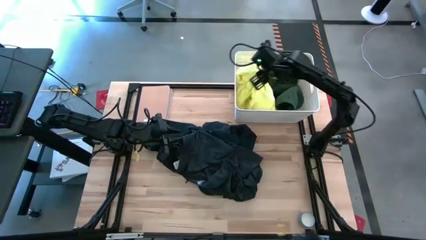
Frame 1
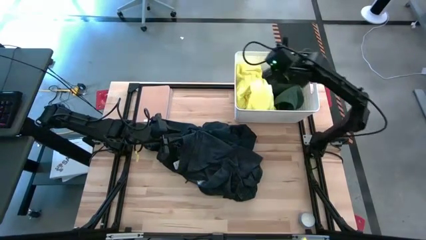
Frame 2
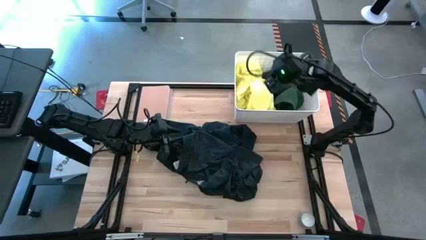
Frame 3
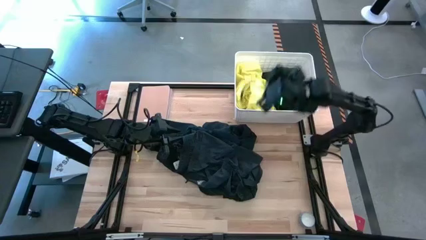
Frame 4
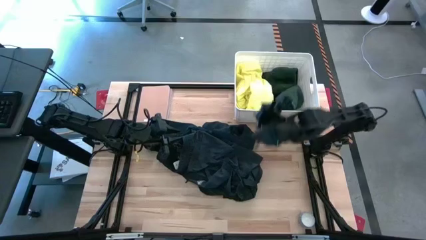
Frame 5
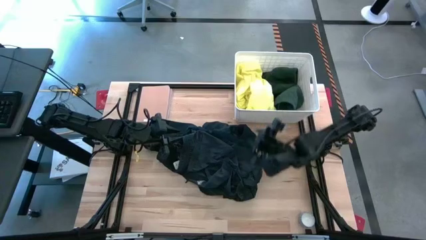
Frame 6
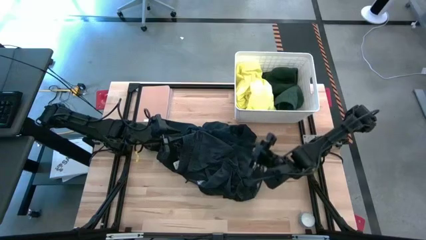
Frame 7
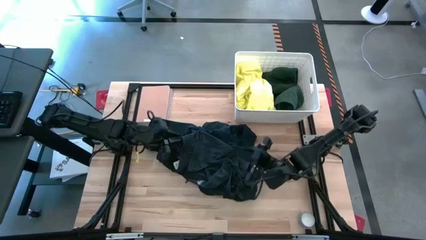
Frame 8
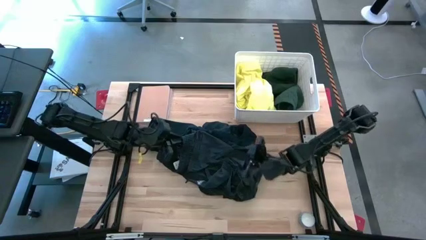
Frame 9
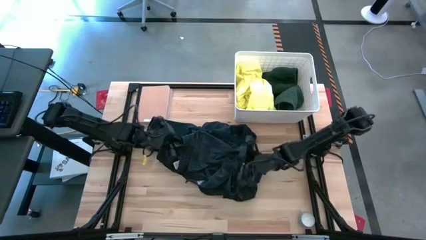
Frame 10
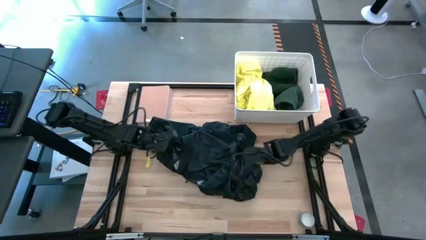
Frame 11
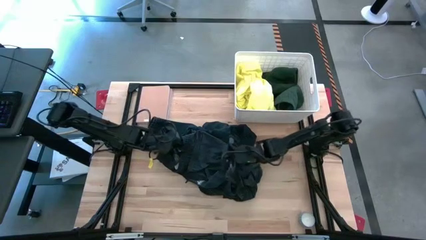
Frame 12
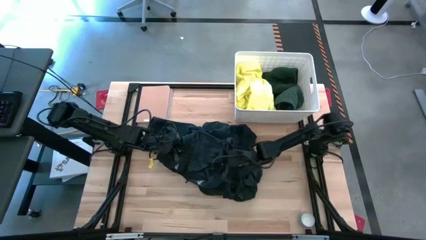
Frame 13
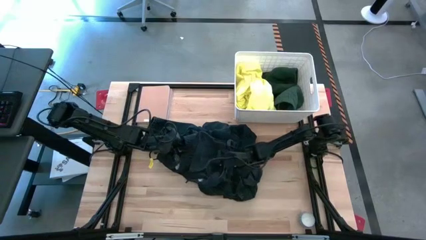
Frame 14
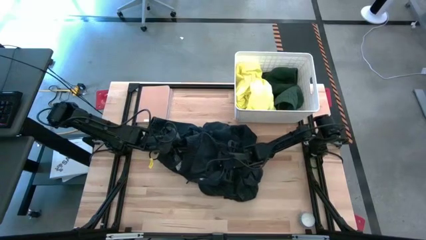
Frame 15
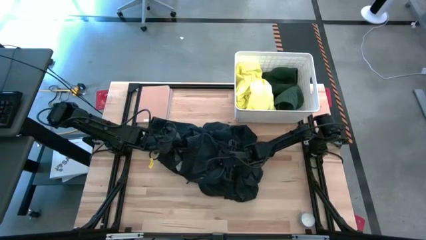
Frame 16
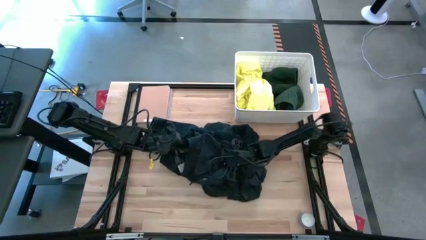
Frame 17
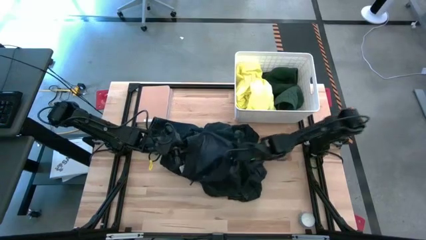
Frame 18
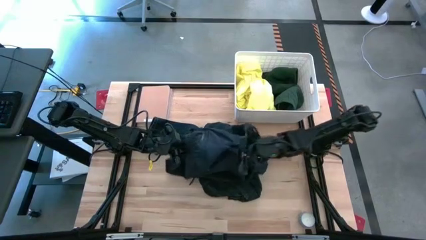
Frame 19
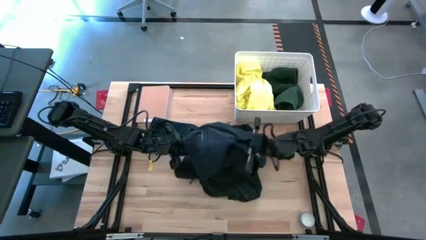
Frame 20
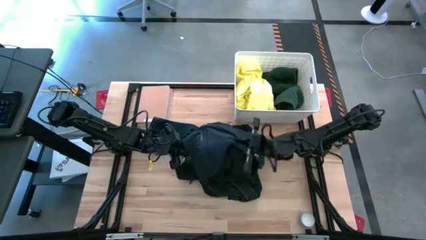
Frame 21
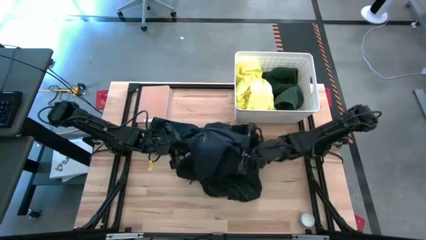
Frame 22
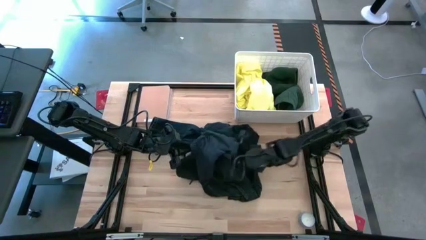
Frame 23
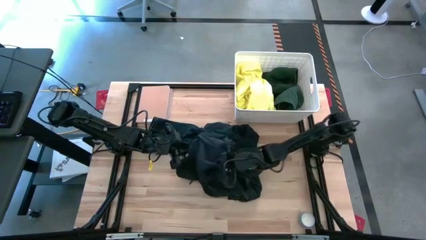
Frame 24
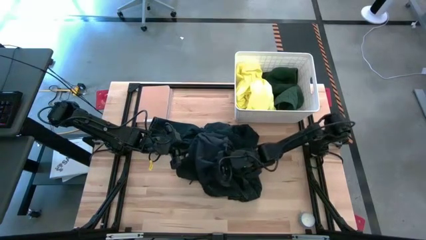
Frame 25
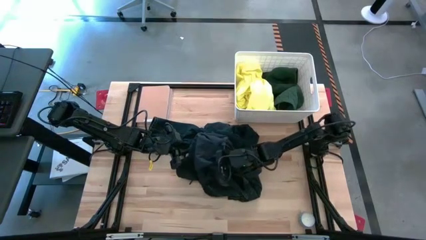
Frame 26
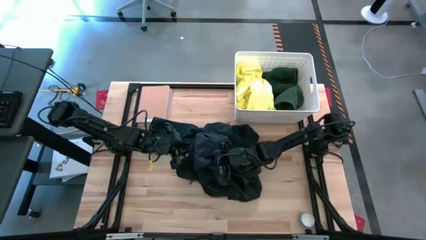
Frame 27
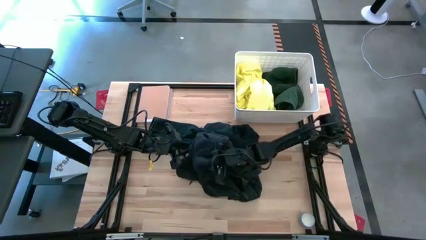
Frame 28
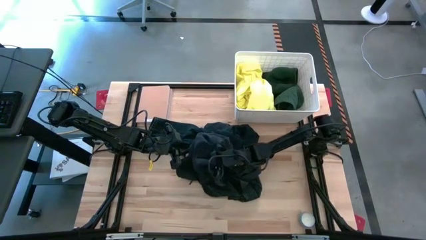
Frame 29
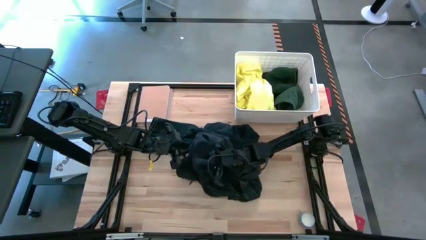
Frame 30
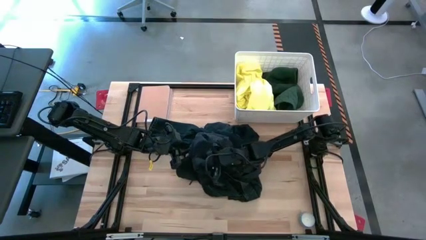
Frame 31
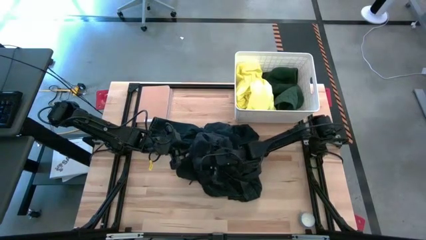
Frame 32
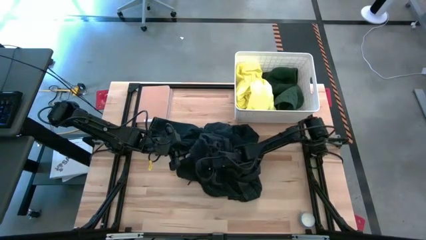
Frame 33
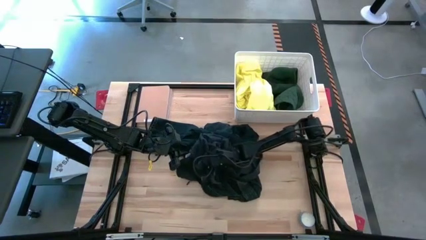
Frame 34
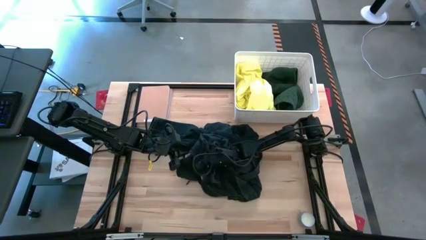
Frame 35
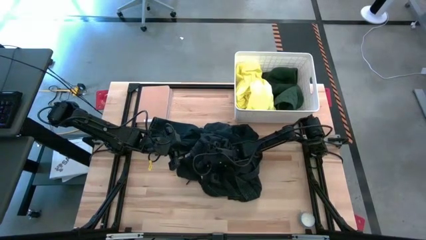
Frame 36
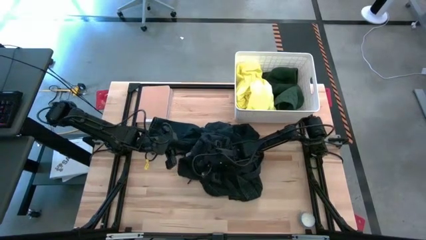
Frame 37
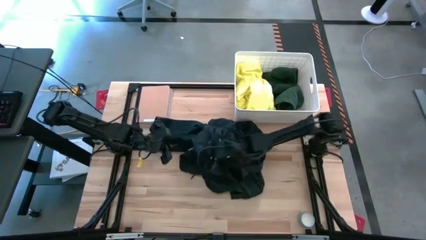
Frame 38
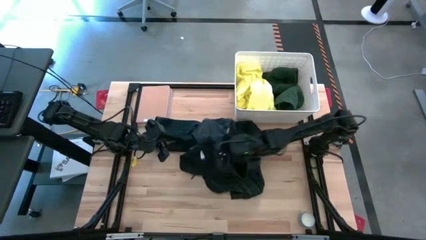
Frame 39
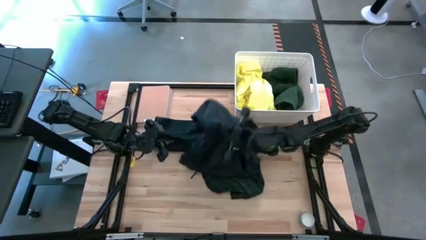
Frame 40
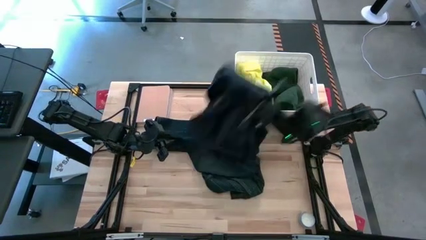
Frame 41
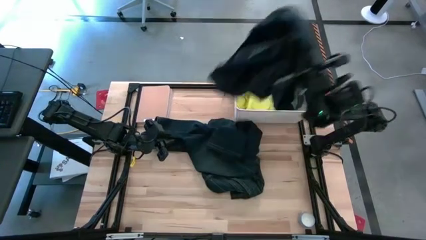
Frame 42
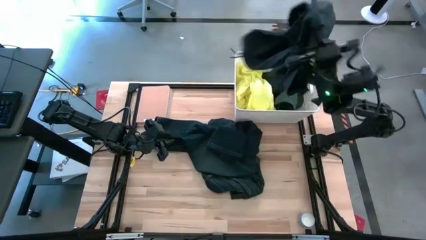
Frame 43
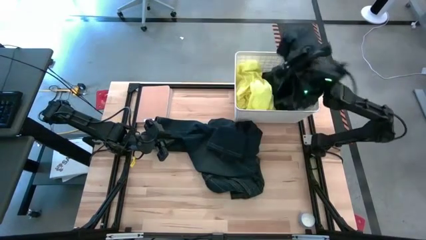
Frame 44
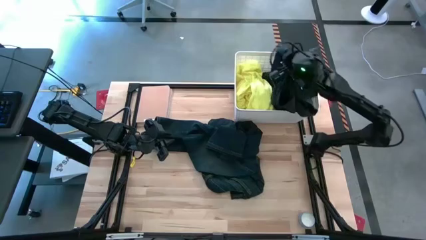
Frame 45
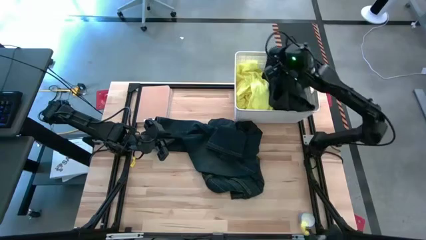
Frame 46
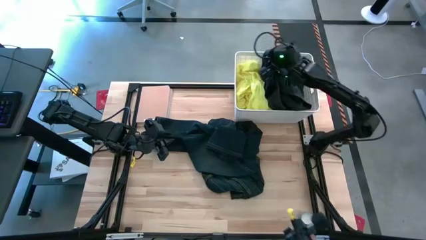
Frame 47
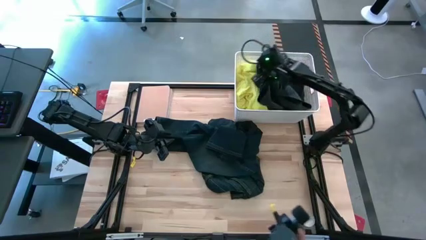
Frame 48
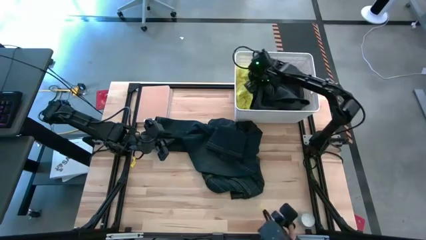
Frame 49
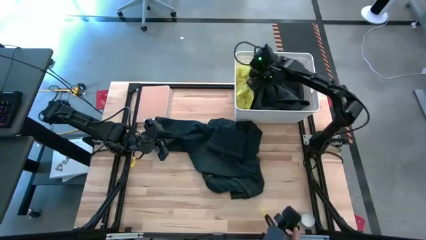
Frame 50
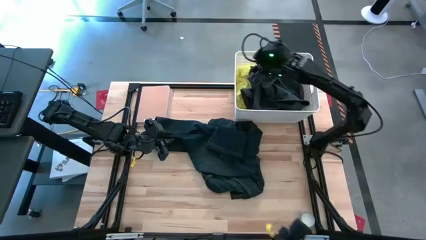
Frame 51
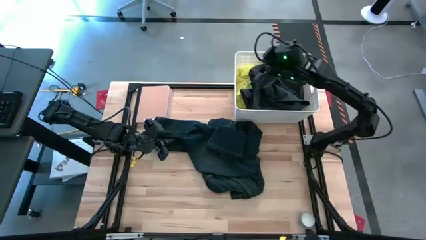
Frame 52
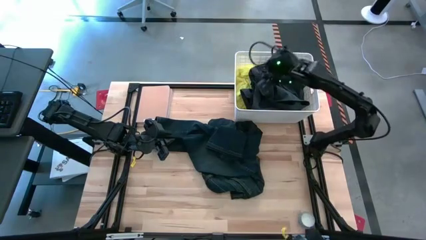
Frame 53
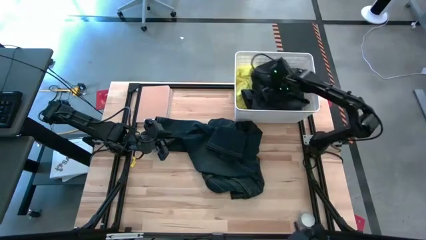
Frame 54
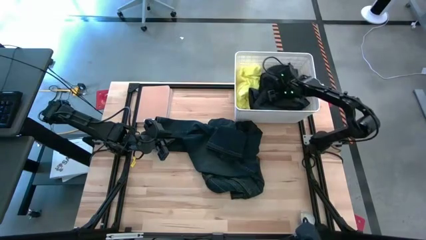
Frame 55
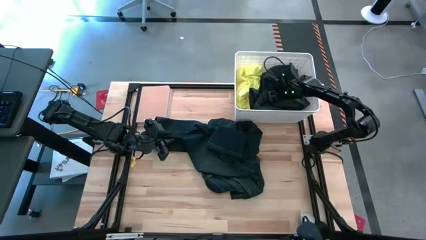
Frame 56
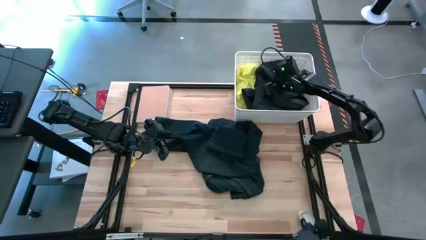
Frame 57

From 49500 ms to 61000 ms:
Task: Sort clothes
Put the black shorts into the white laundry bin
